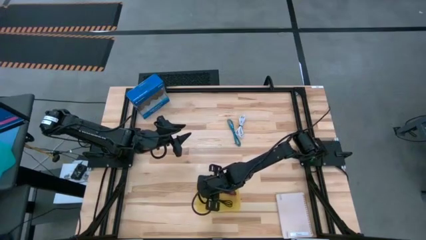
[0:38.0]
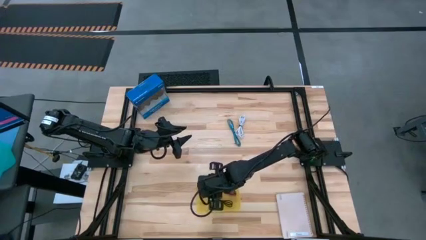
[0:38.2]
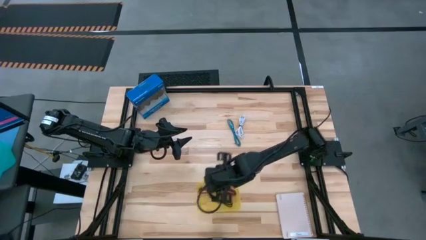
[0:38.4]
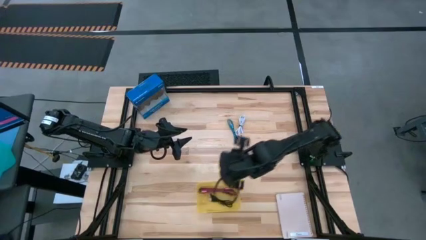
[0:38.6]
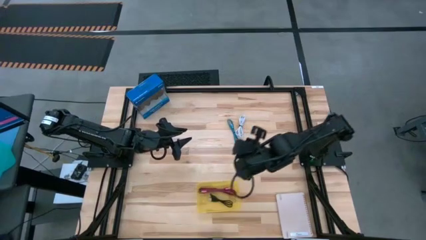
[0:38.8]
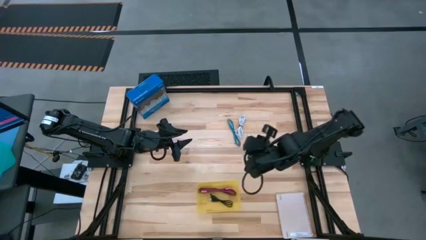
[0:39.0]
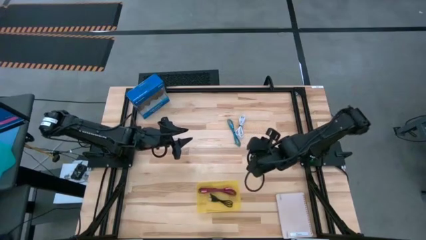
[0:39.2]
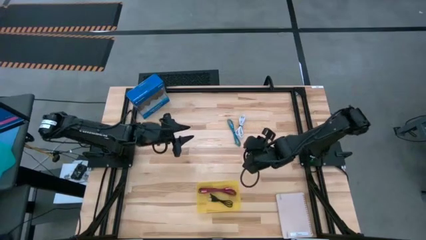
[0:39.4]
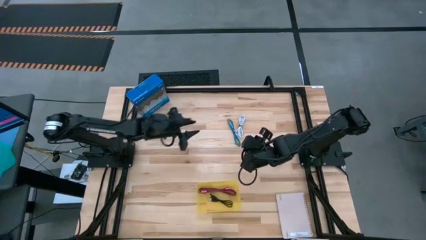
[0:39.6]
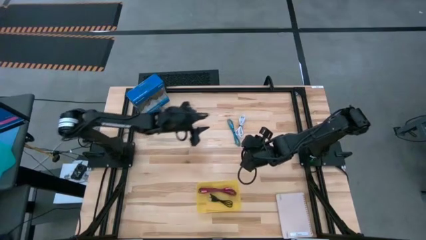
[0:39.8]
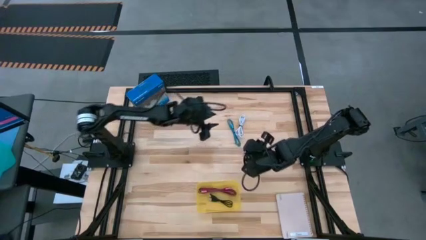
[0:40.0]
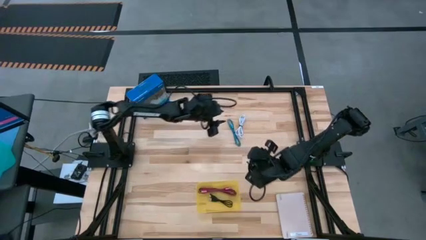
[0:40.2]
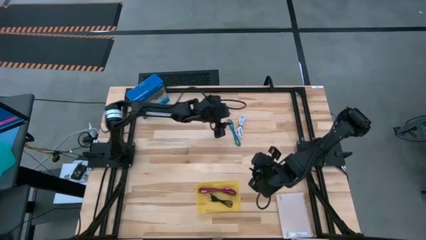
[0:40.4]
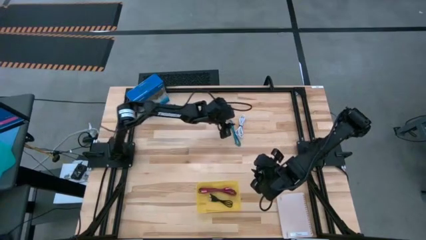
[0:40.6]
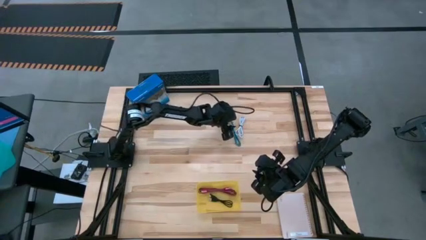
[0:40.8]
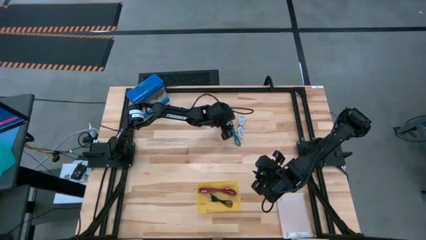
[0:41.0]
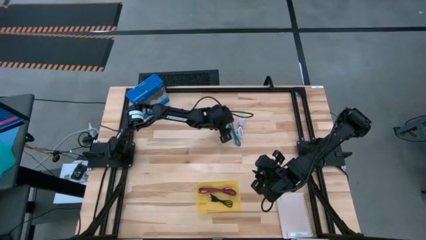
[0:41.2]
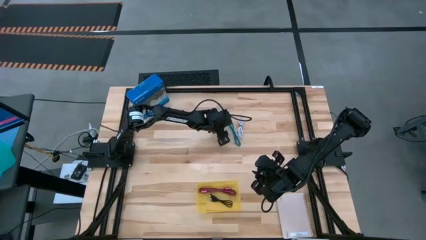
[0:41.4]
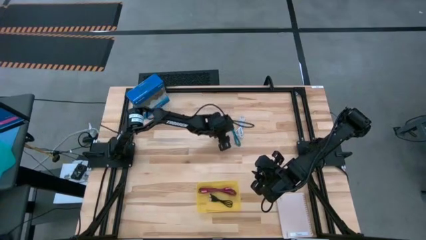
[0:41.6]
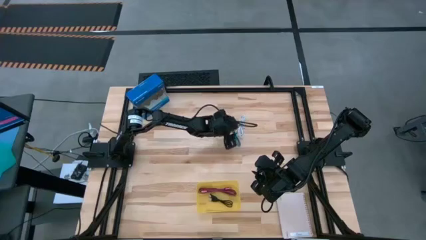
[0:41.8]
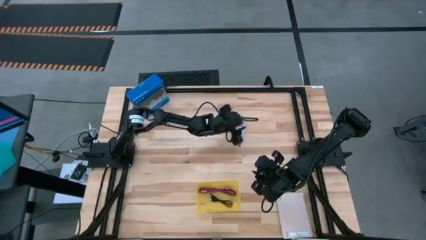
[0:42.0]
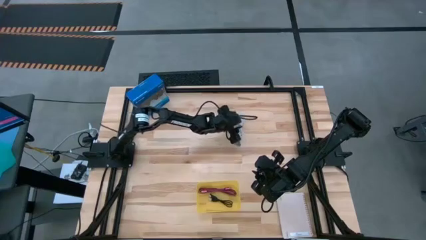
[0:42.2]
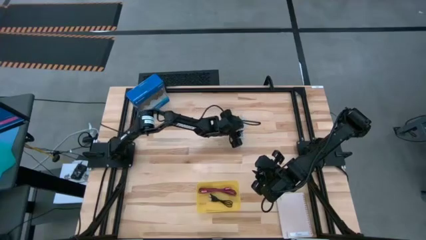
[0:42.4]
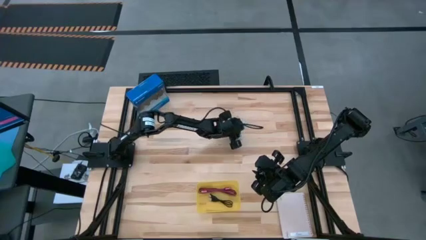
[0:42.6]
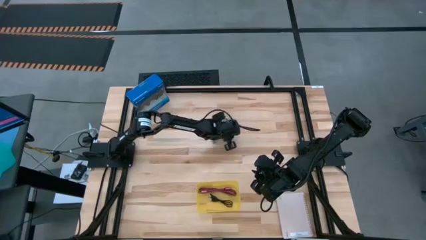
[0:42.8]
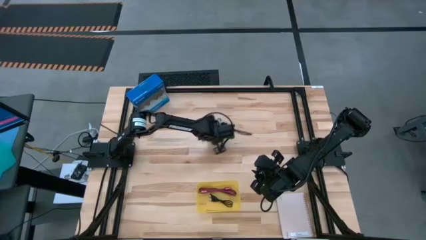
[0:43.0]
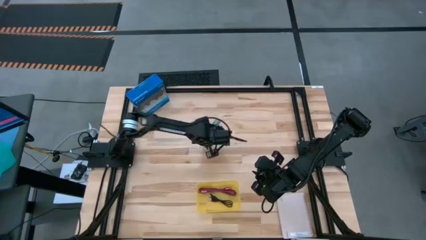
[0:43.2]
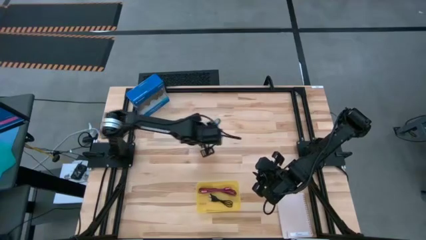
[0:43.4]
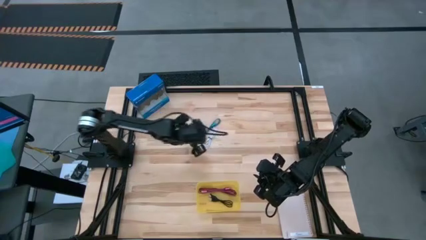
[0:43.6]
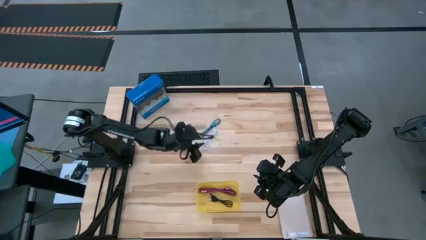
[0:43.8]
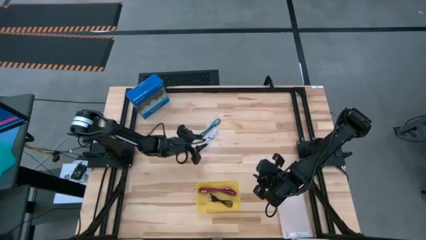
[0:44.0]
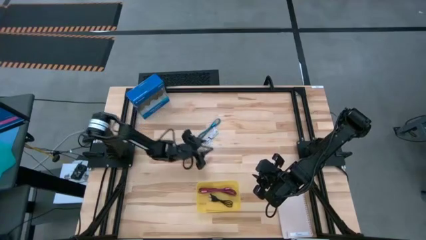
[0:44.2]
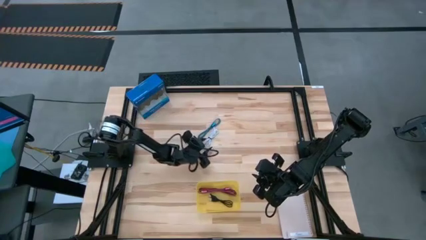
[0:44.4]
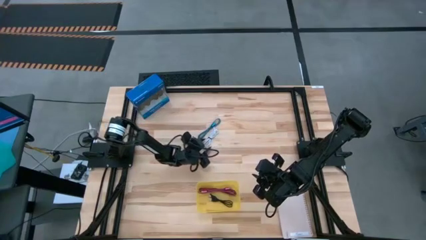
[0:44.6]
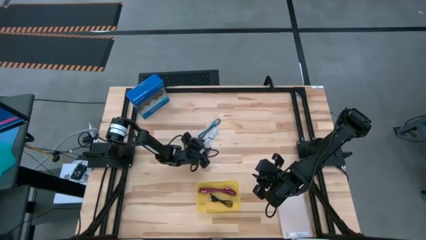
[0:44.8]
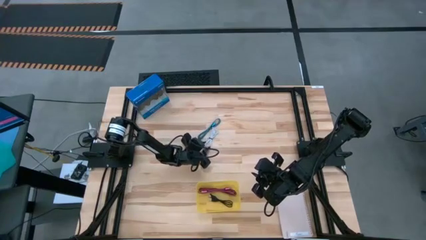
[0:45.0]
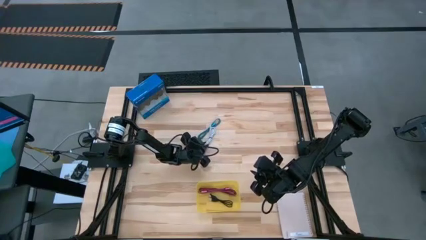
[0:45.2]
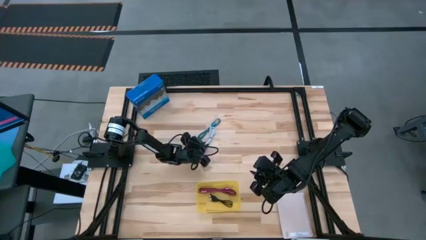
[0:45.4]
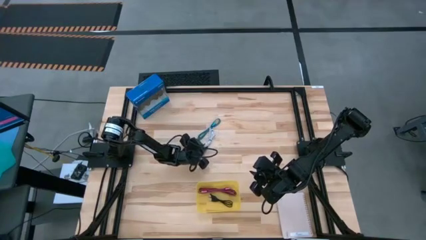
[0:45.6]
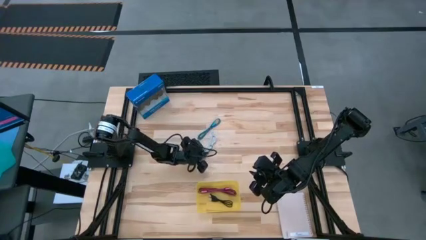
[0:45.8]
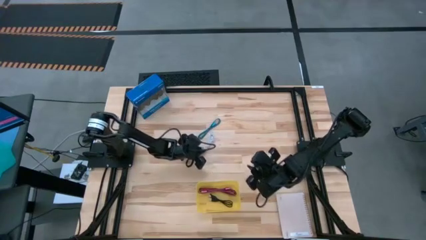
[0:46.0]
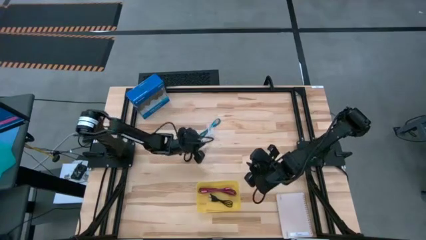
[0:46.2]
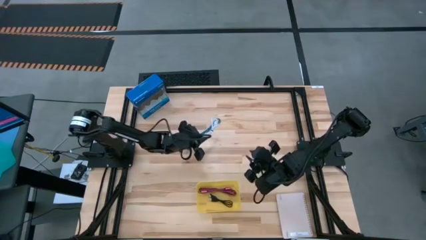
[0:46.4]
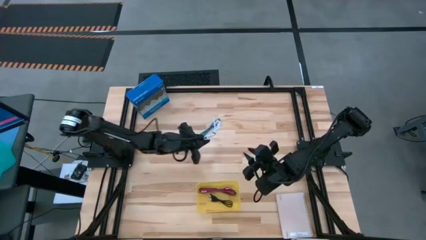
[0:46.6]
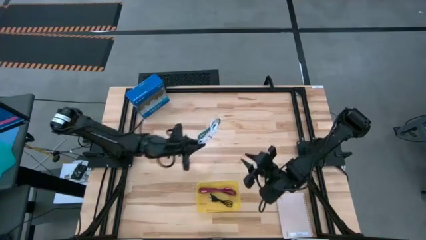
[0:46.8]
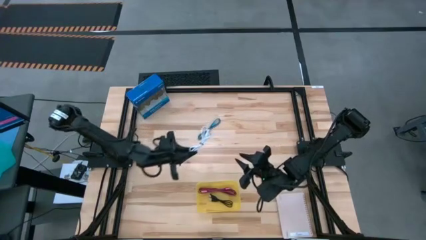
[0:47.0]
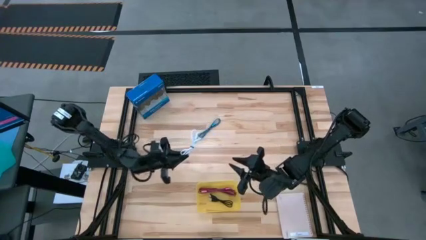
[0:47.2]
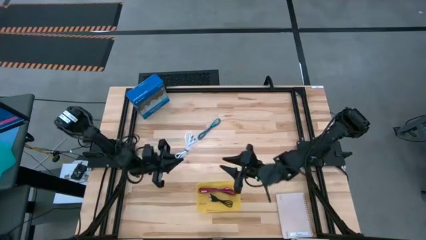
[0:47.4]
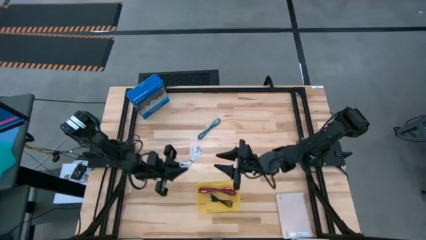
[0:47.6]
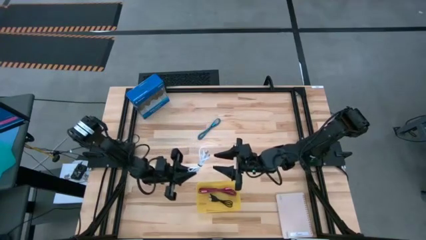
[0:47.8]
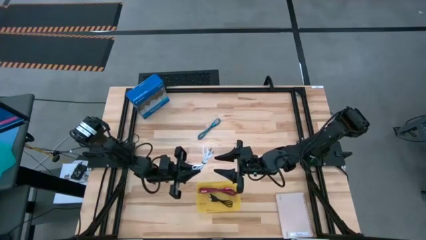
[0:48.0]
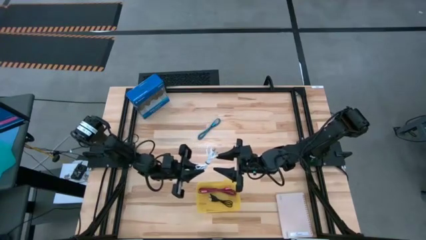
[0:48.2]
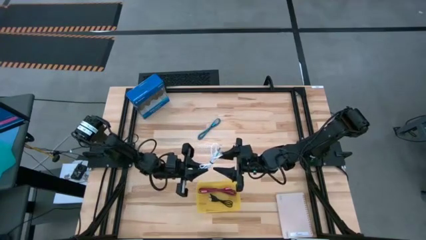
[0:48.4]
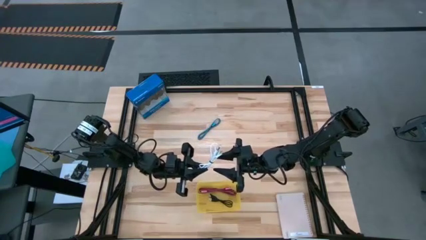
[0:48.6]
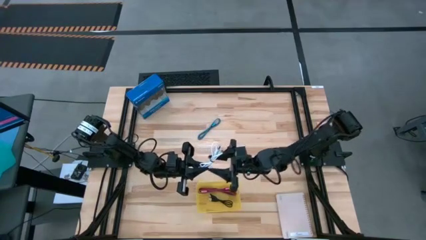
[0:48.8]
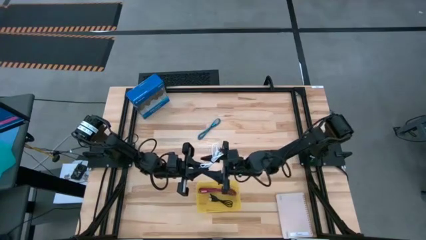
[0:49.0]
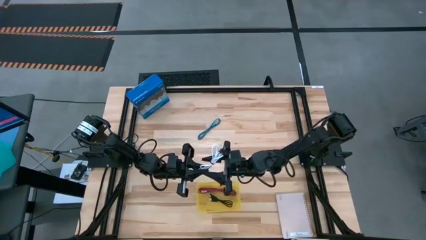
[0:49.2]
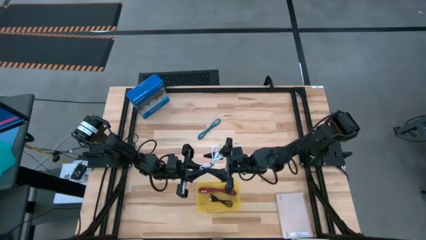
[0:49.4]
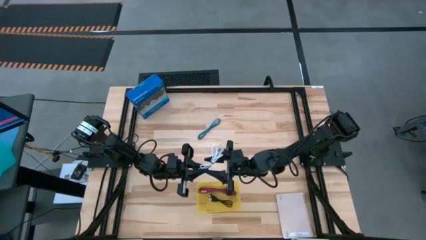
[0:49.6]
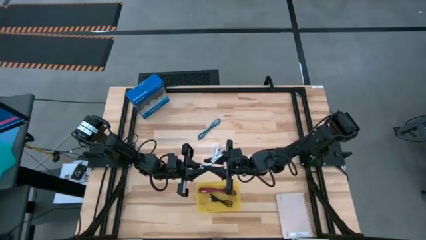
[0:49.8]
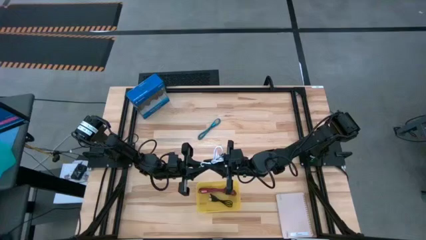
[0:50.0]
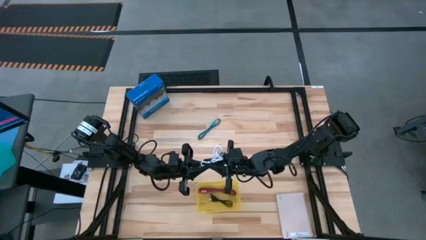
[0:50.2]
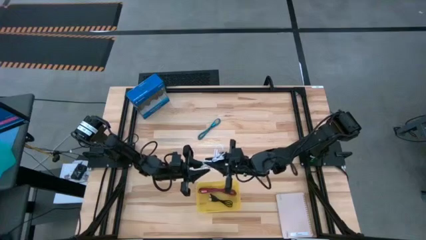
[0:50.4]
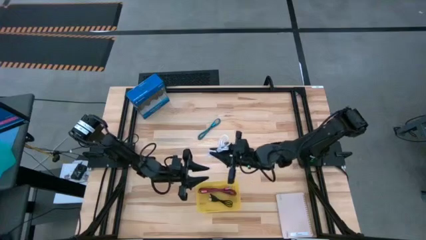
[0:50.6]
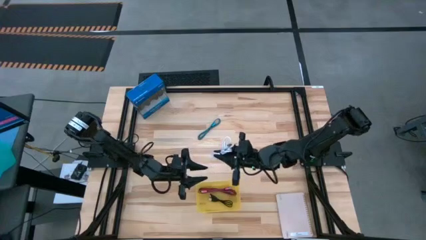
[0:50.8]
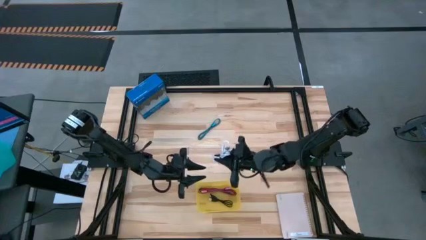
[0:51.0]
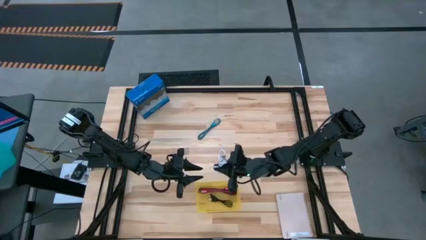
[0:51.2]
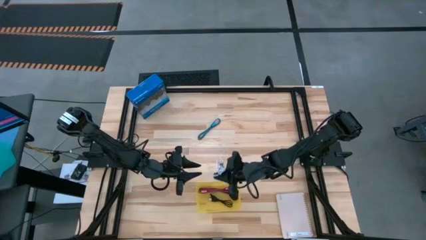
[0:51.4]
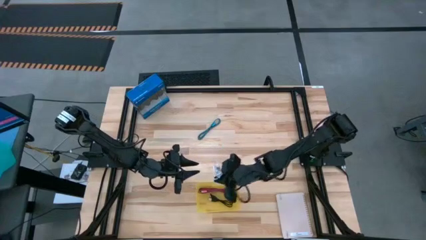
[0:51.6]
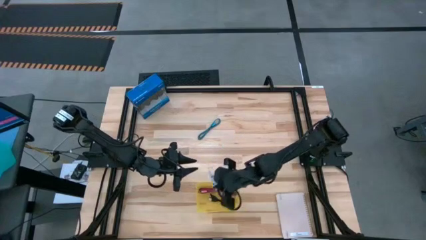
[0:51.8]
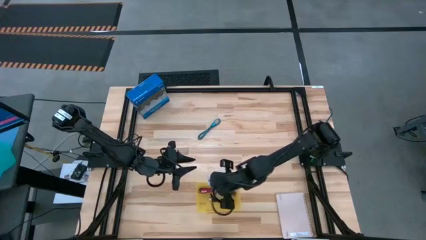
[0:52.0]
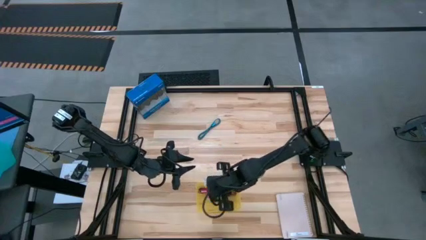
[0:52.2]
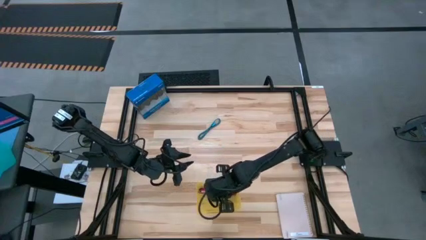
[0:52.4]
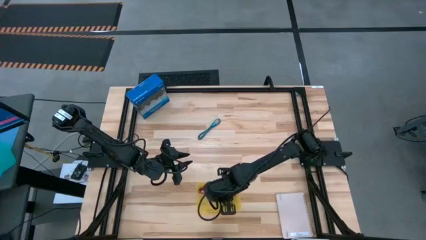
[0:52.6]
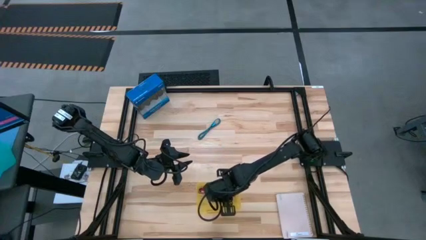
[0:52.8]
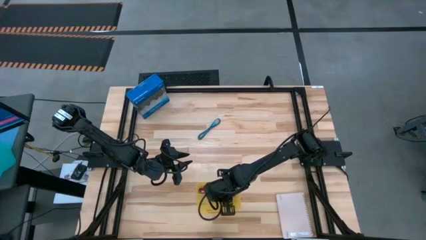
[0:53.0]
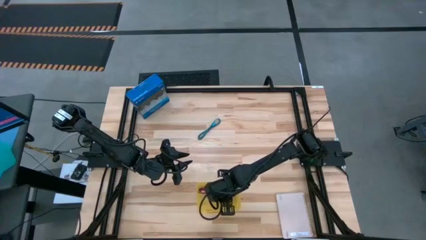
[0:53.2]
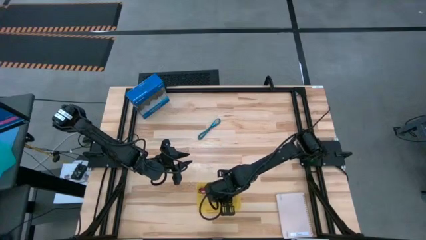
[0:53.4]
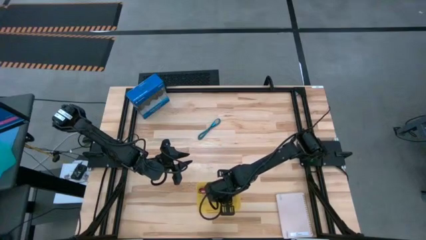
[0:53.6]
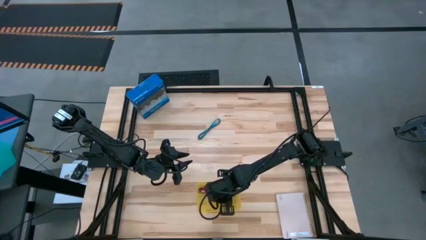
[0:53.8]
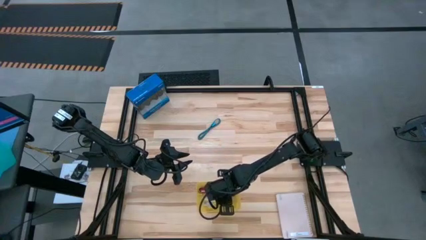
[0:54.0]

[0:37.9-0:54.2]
Task: Pick and place USB-C Cables
Put the white charger cable into the yellow bin

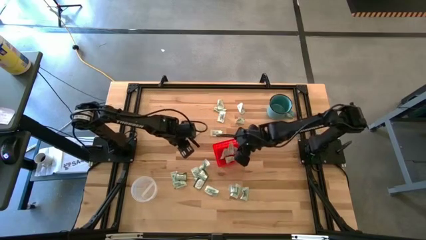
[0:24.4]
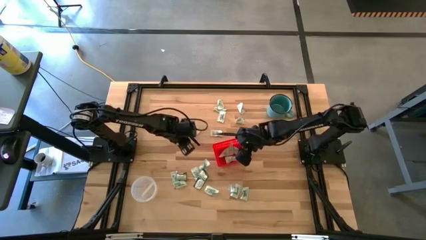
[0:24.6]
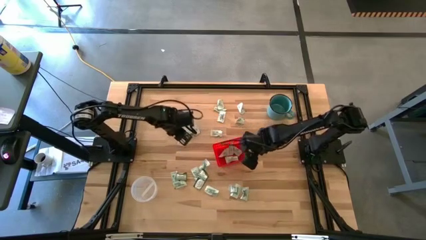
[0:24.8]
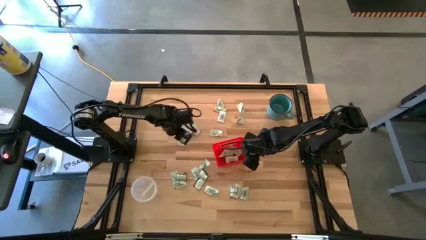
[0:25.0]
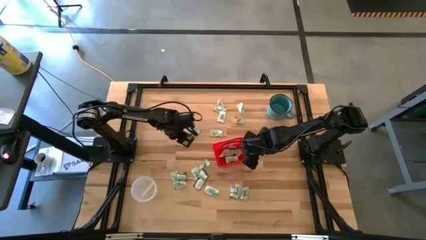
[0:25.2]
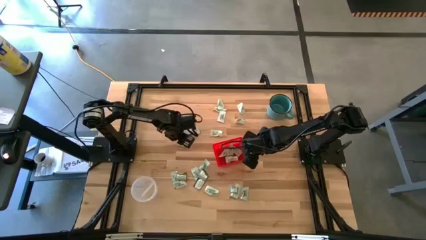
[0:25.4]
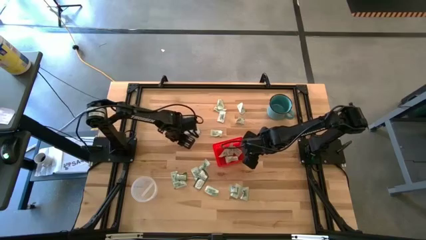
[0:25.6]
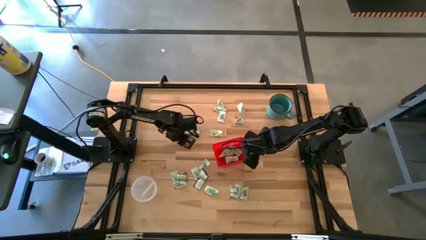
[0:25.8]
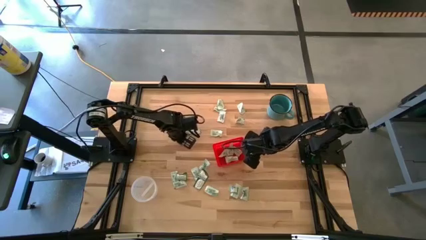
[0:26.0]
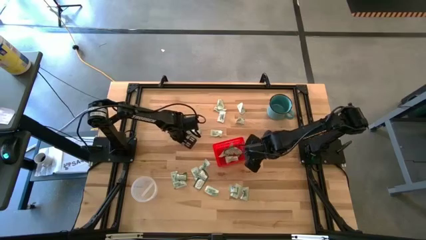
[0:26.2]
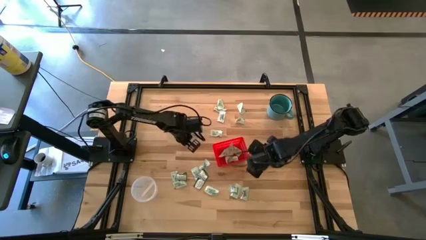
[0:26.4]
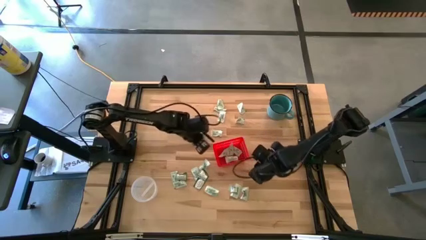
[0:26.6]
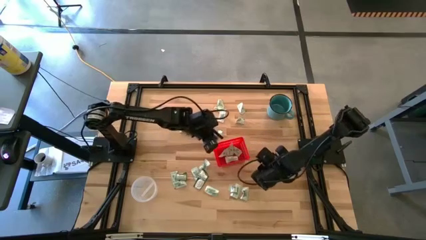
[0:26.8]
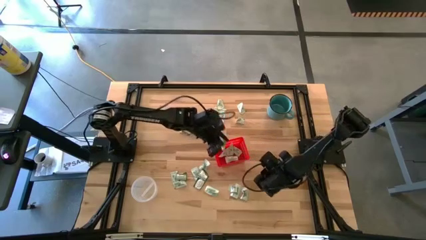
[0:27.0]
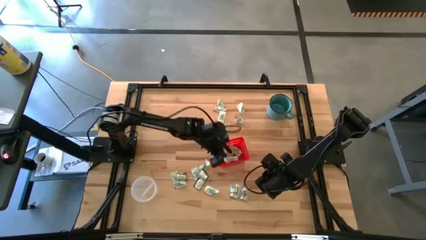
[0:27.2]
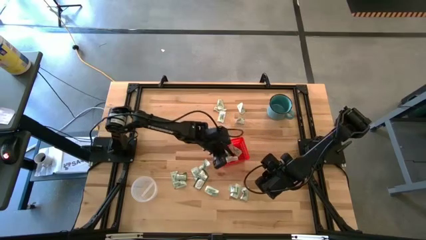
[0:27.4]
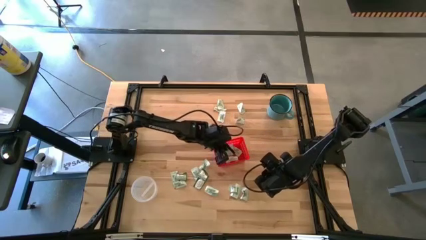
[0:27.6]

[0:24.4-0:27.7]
Task: Pick and place items into bin
Put the white stevia pack into the red bin
